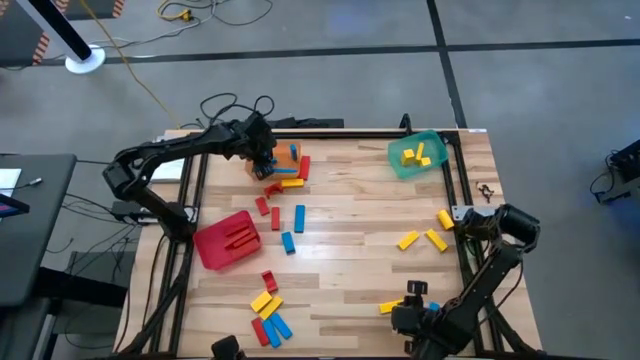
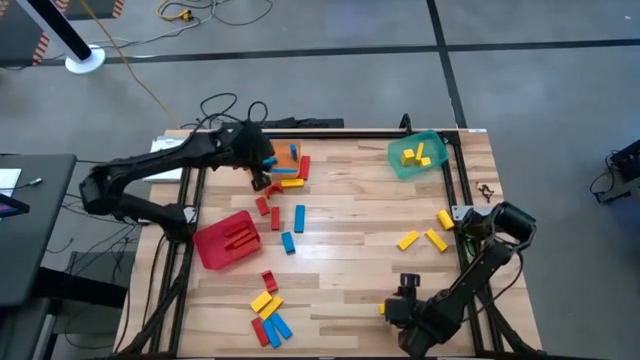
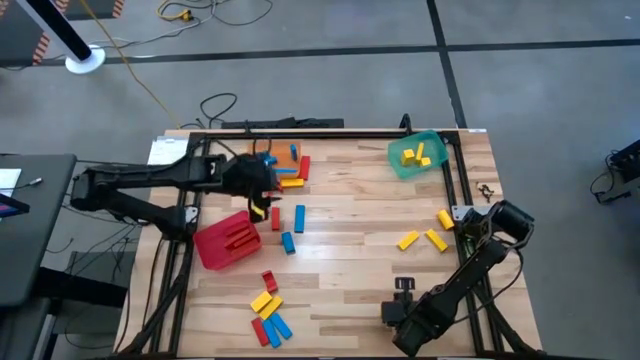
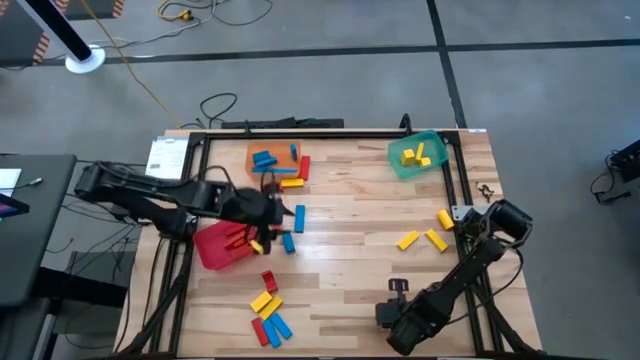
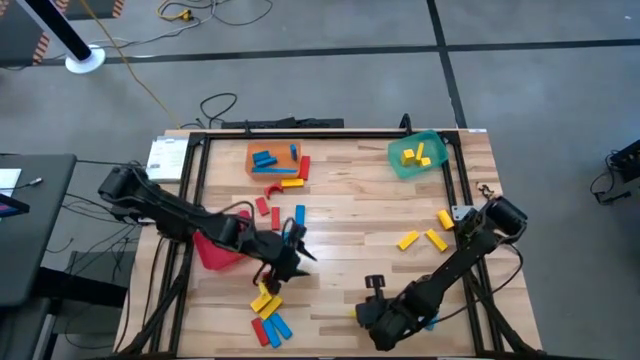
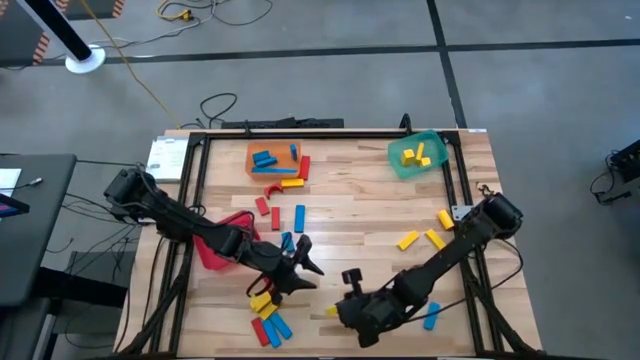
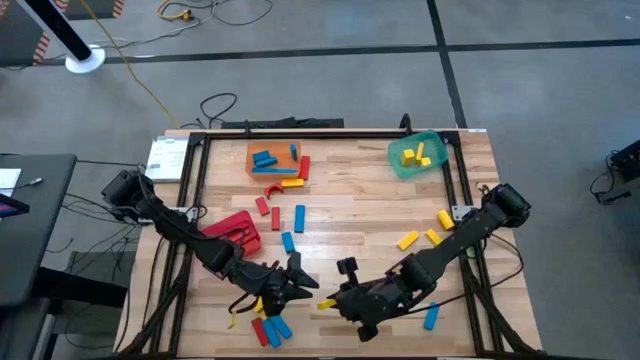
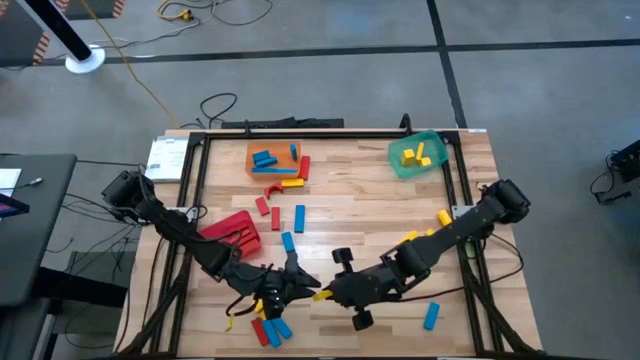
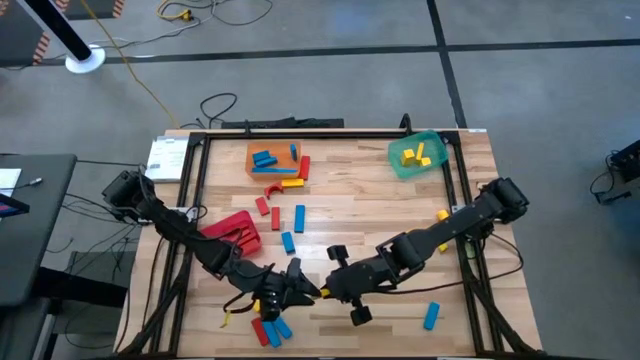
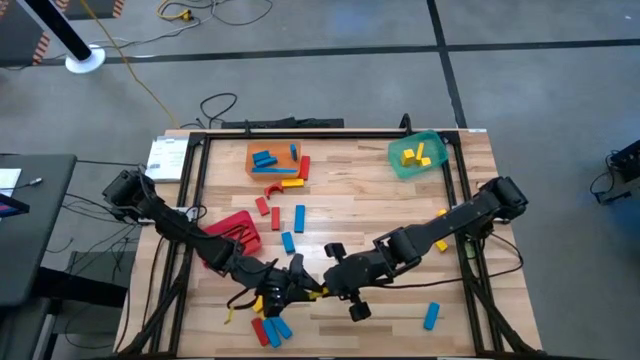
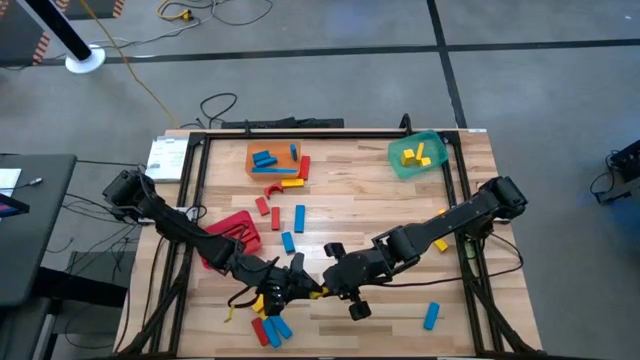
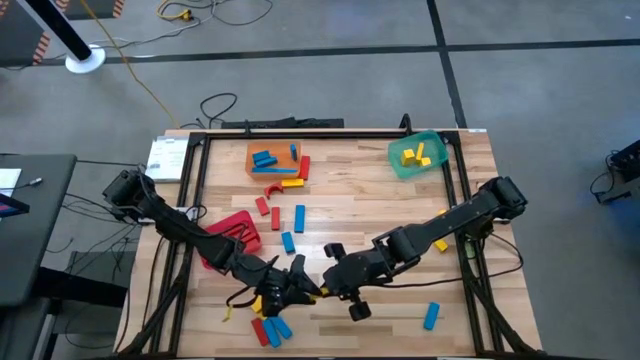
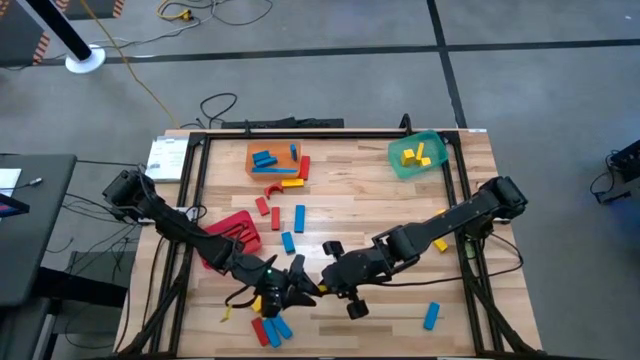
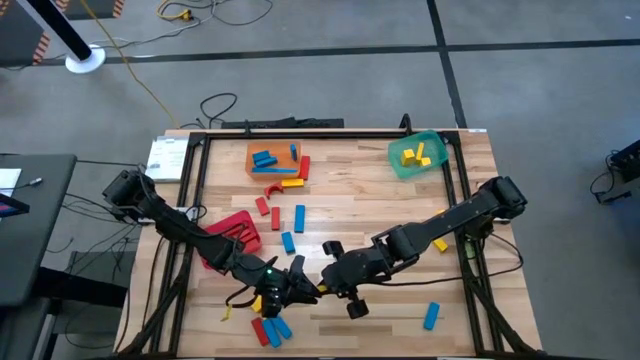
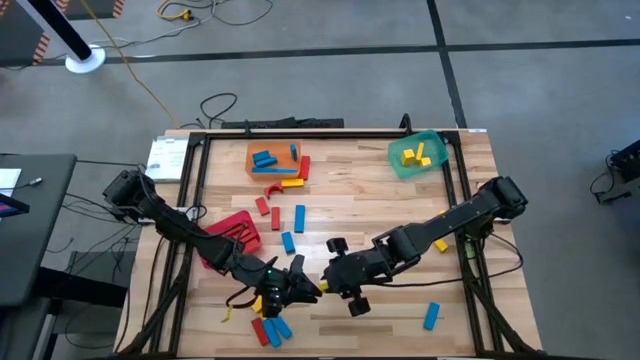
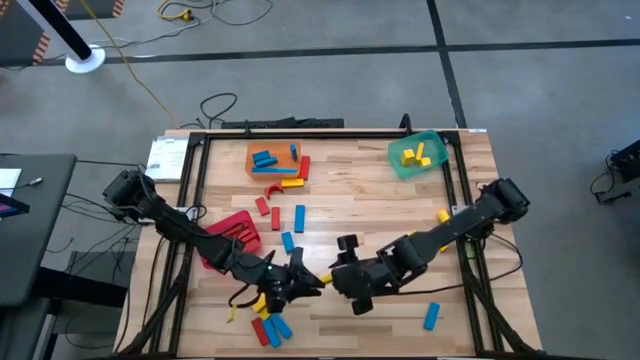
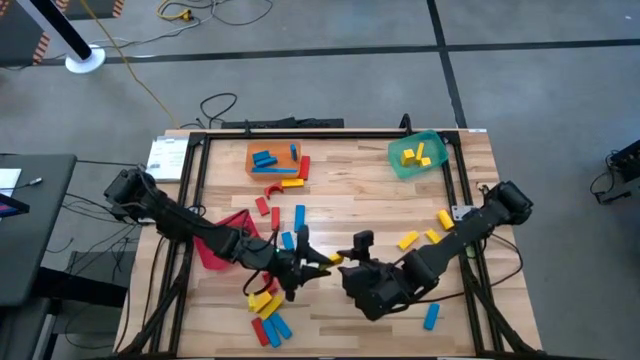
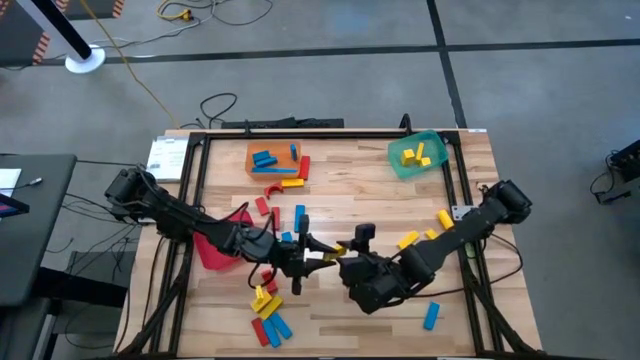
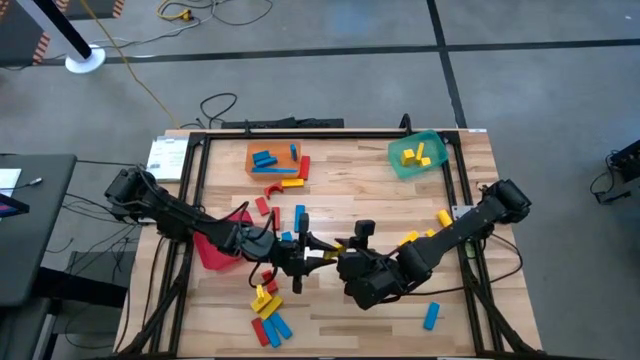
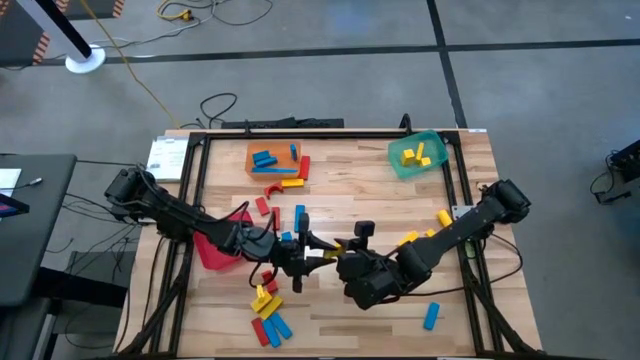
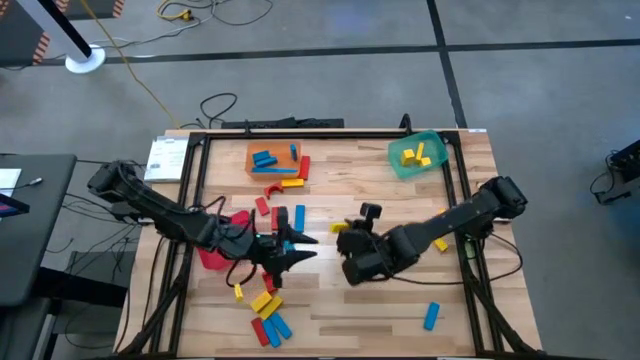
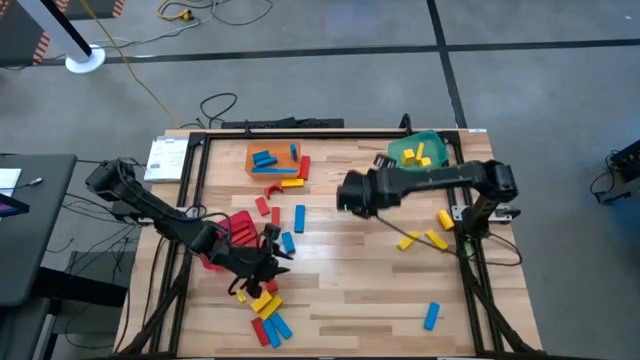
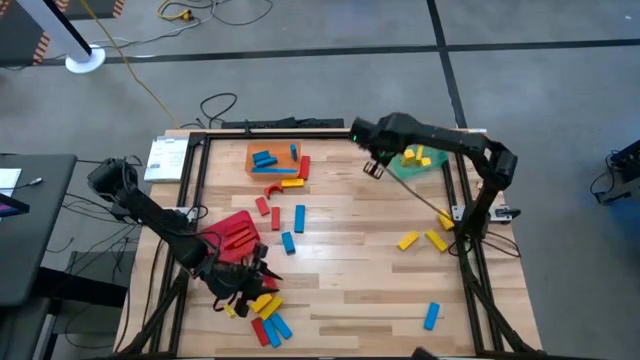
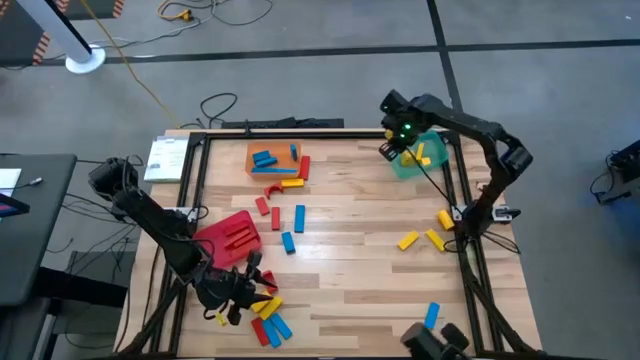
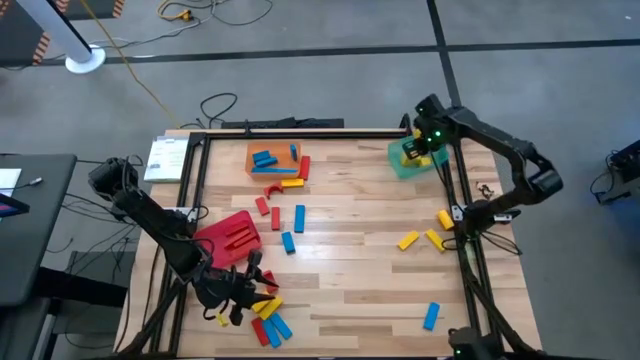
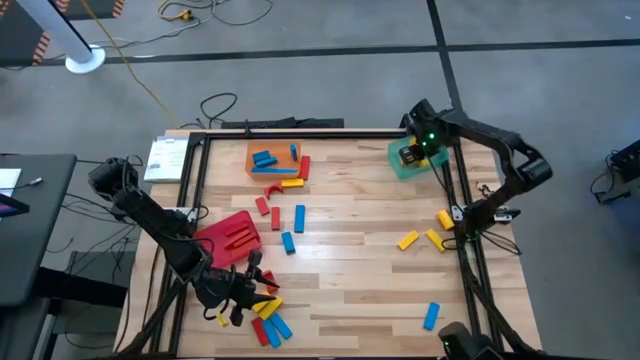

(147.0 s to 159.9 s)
Task: Sort blocks
Put the yellow block into the green bin

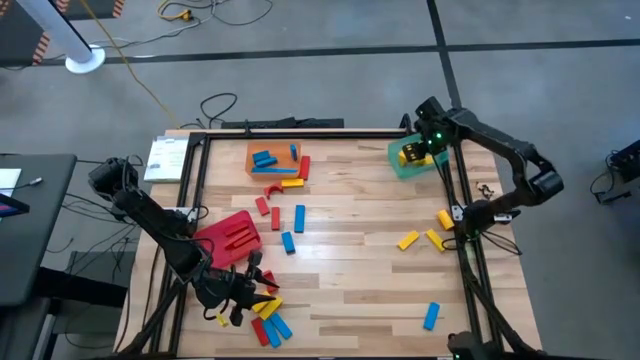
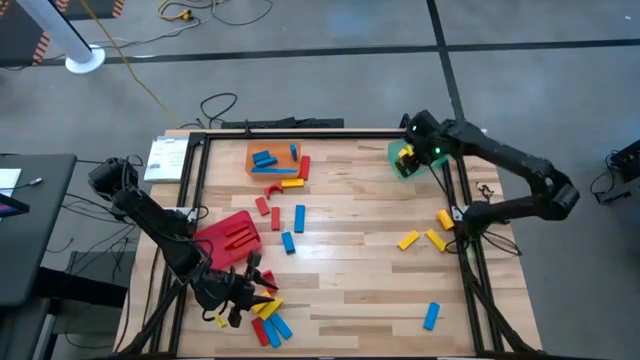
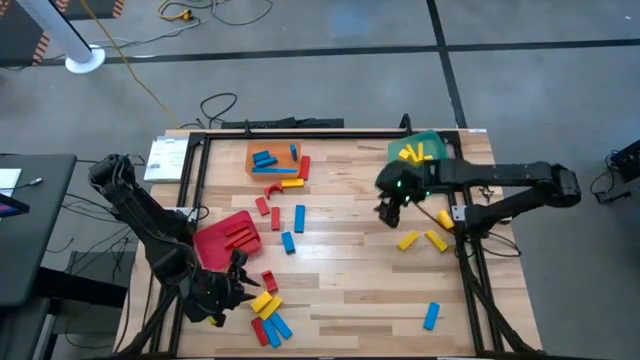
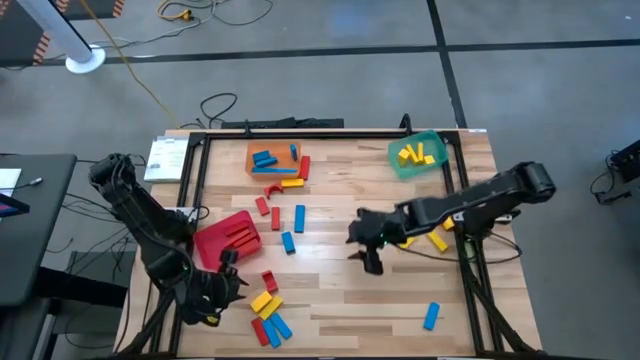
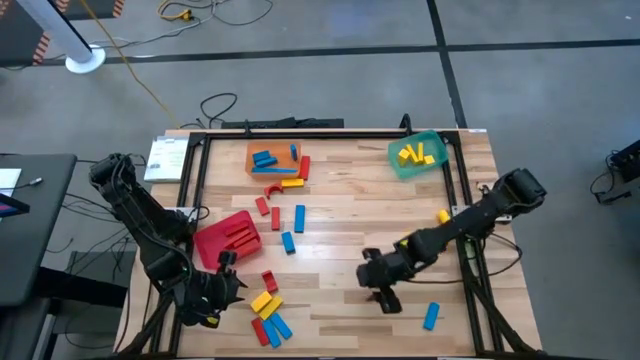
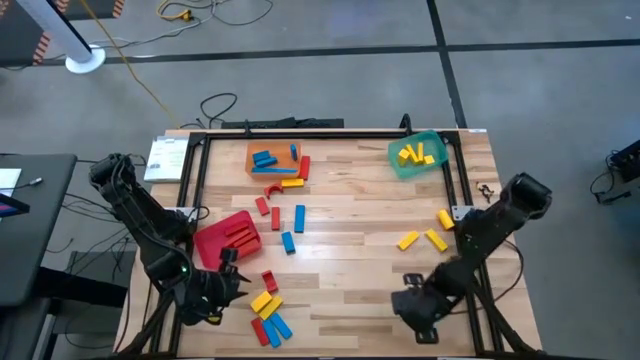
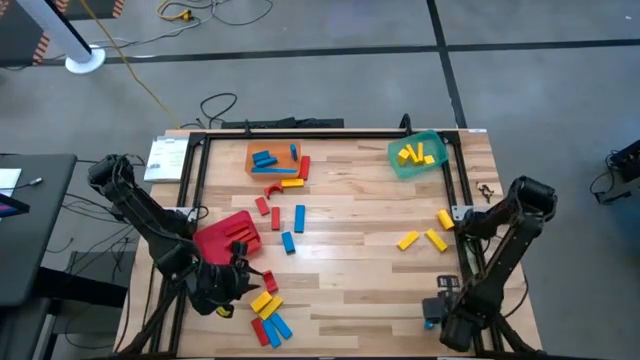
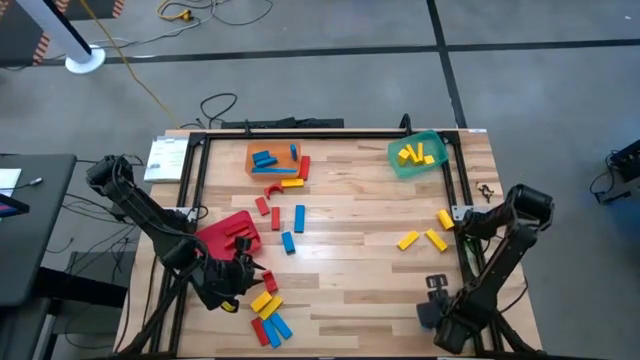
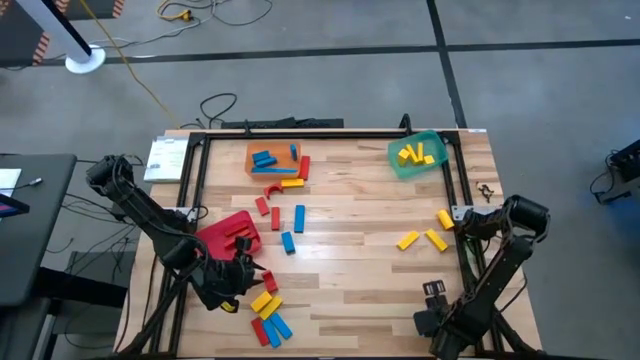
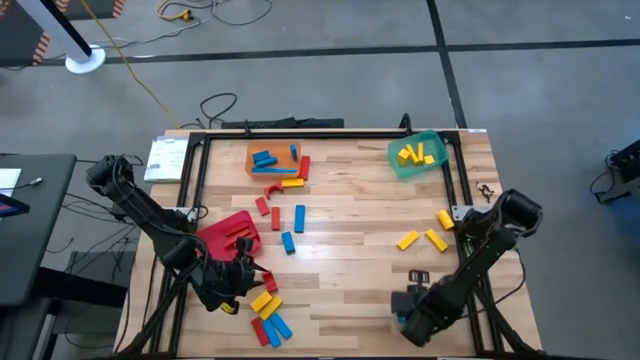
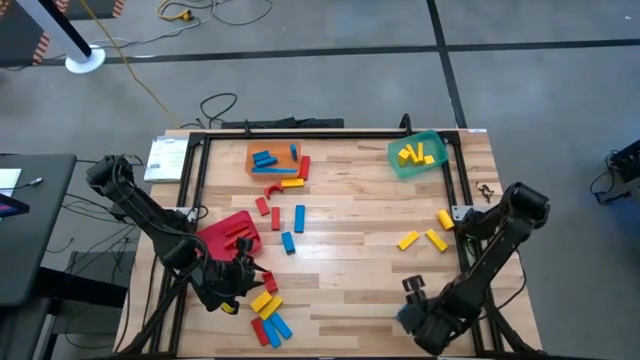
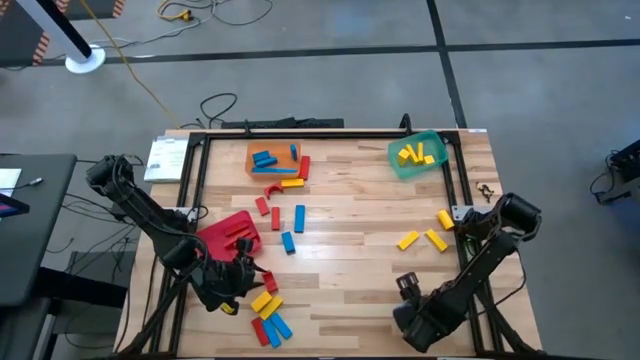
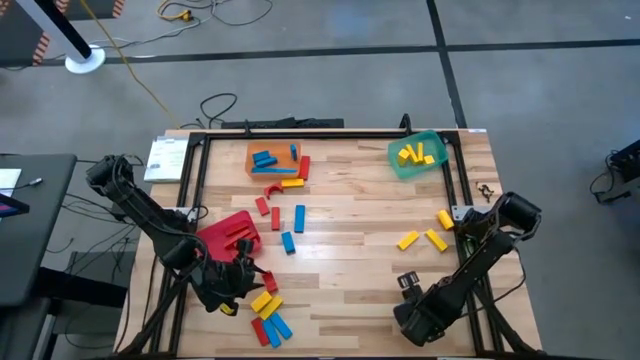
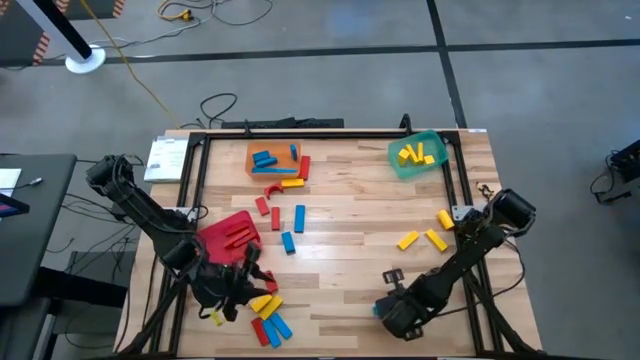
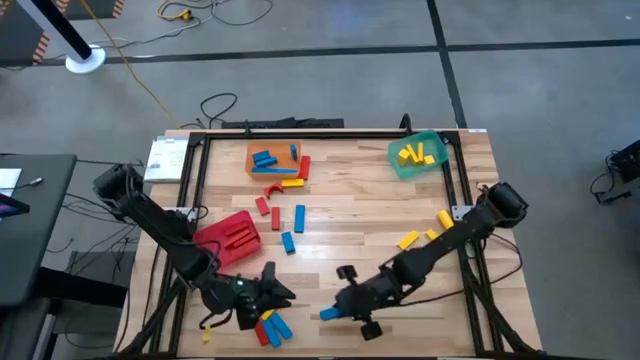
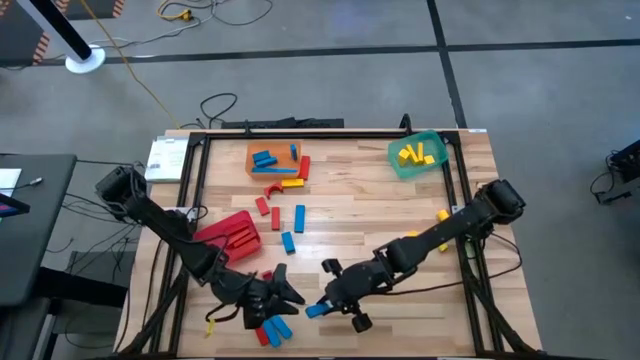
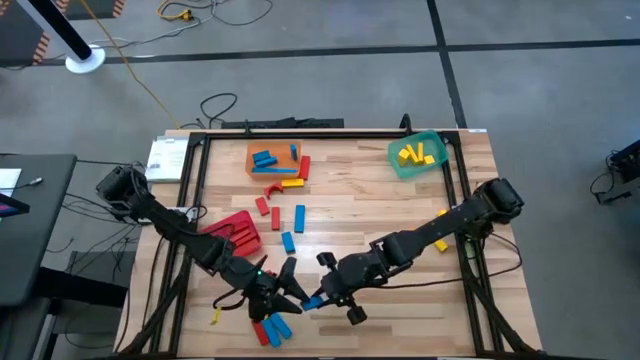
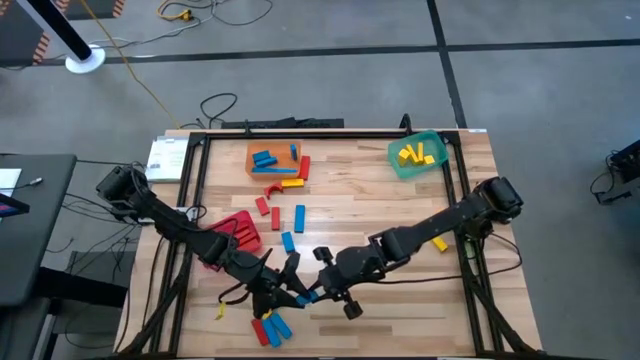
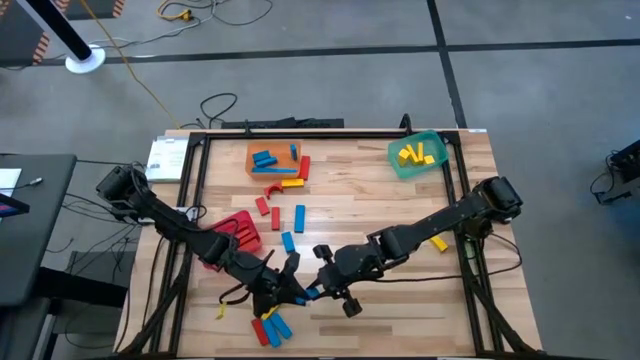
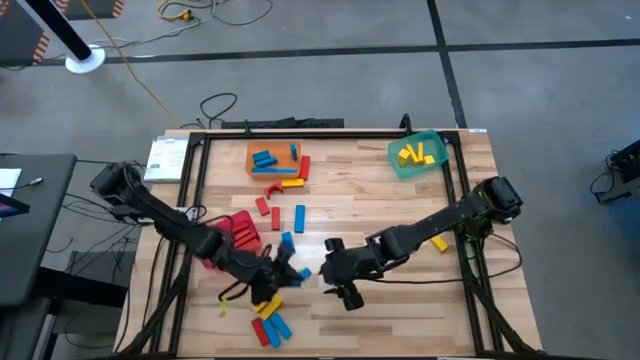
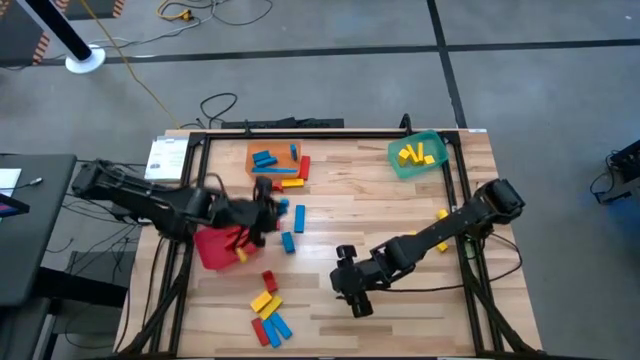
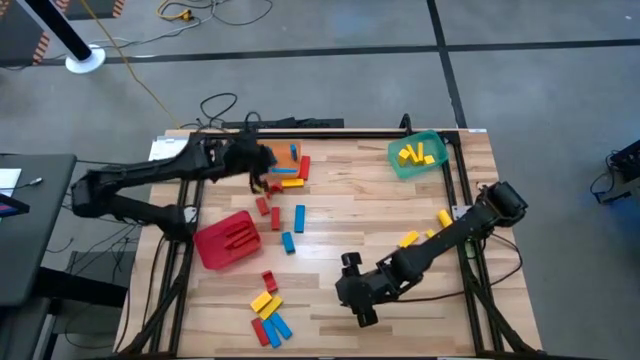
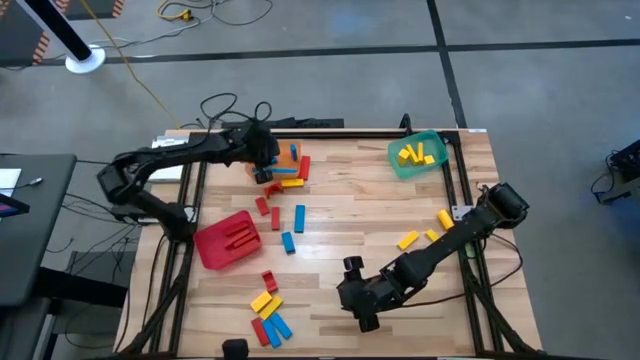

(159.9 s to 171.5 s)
Put the blue block into the orange bin
